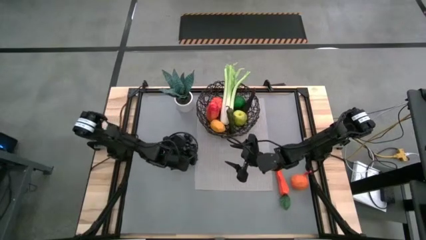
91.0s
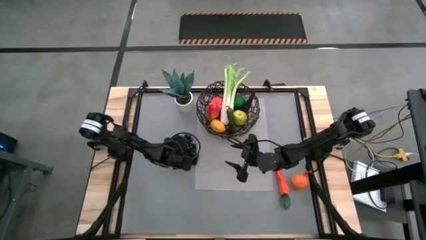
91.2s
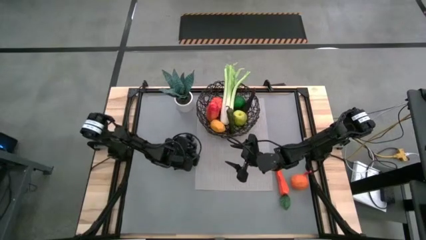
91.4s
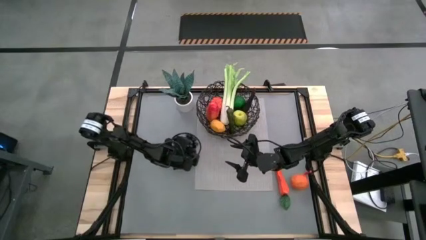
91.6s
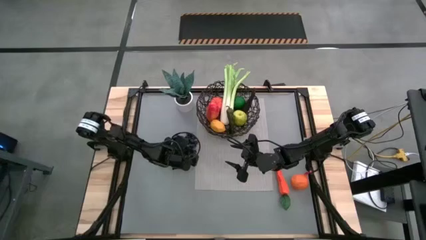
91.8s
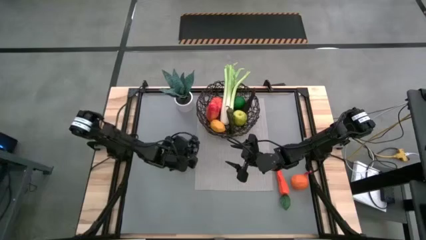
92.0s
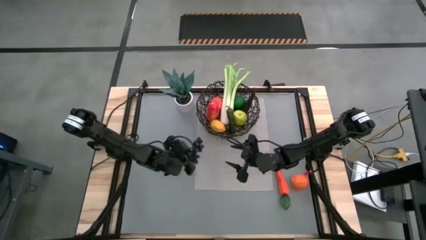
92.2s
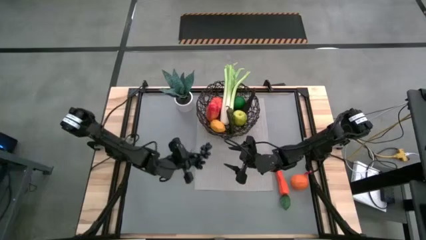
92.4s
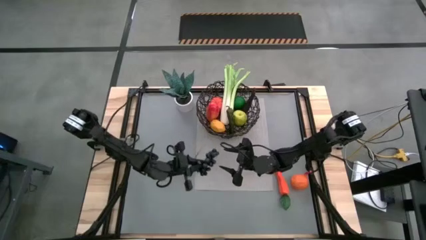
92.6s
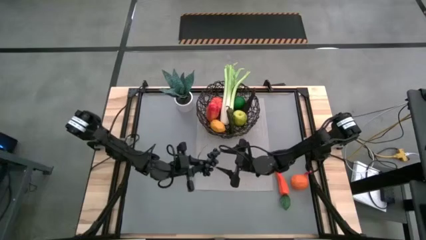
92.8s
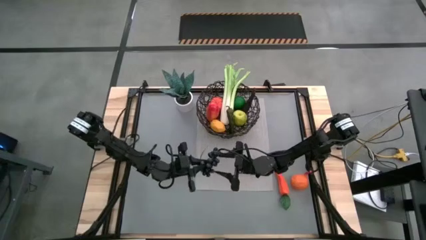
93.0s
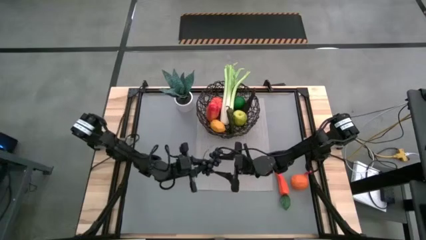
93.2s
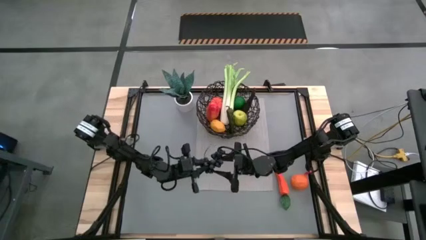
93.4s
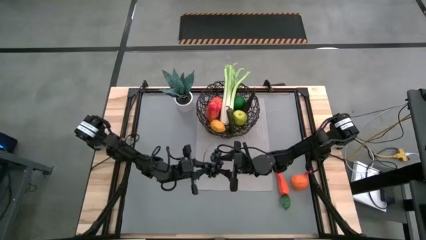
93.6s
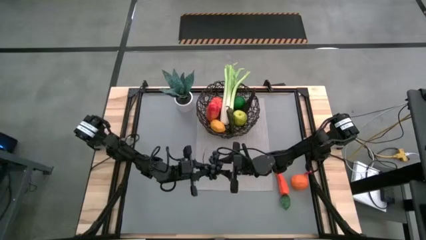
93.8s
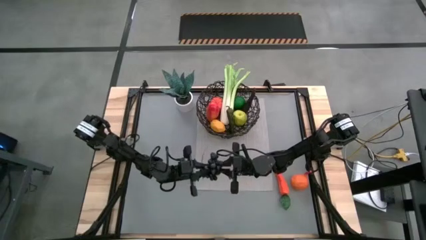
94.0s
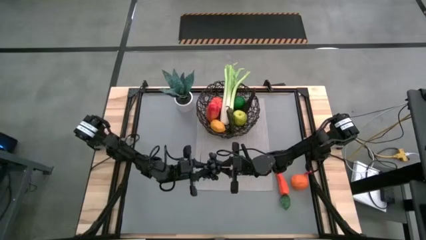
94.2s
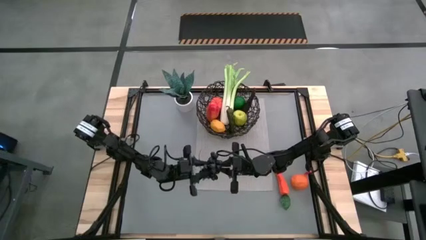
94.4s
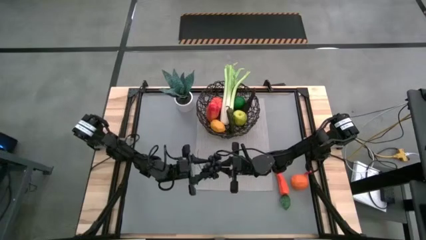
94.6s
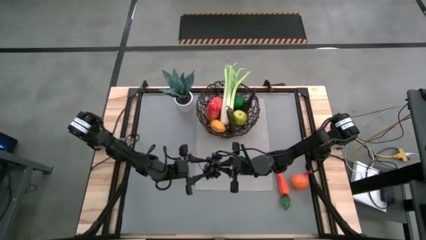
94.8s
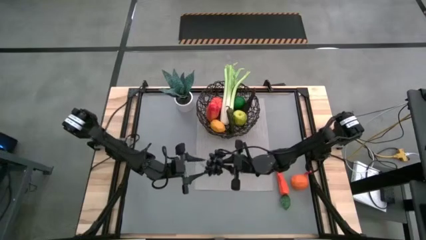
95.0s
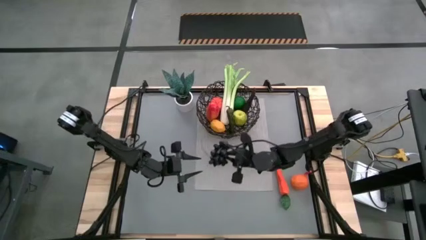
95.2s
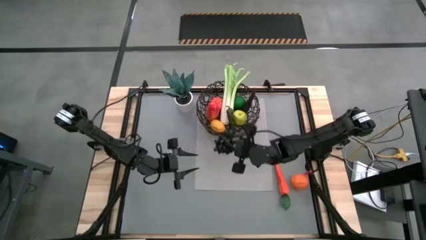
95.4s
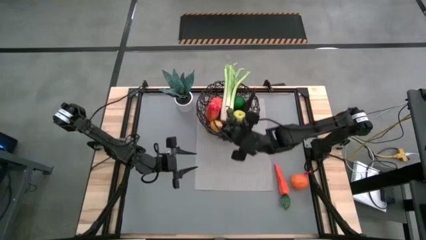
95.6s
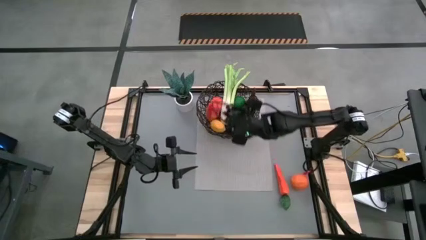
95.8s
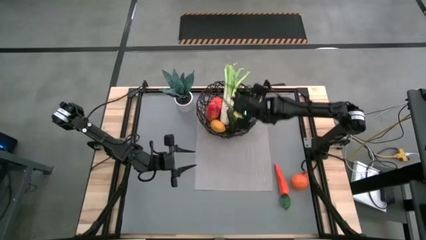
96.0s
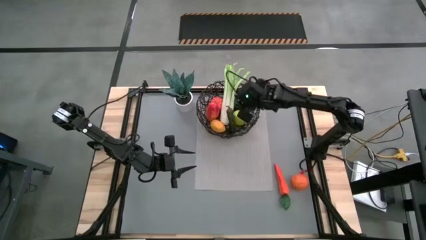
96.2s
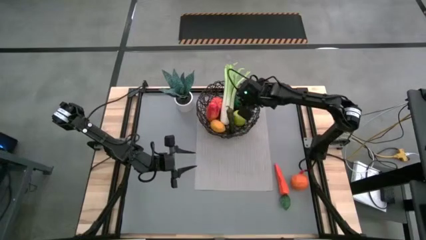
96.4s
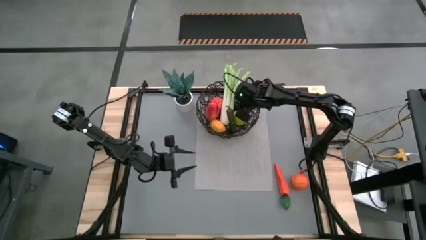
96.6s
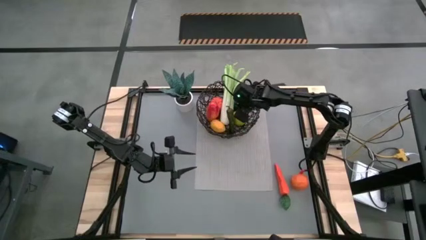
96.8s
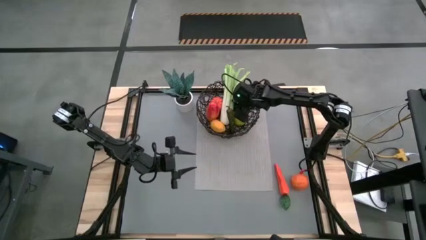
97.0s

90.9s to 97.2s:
Task: Build produce basket
Put the dark purple grapes into the black wire basket

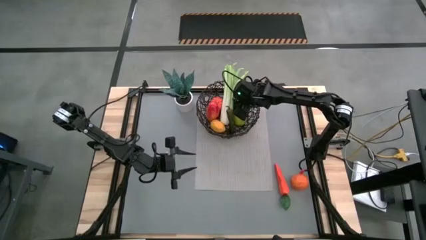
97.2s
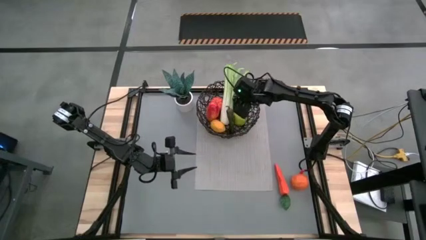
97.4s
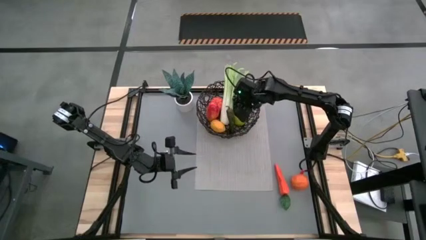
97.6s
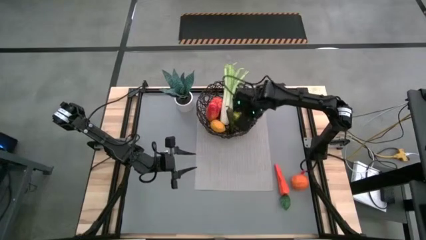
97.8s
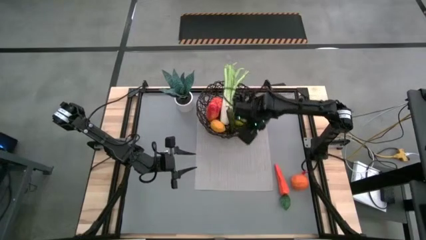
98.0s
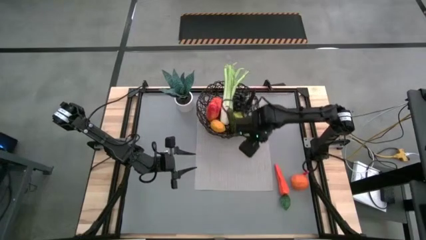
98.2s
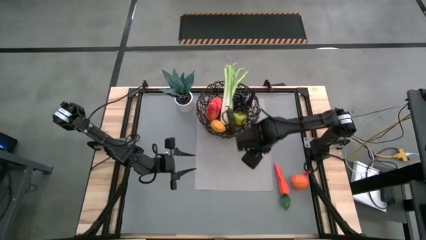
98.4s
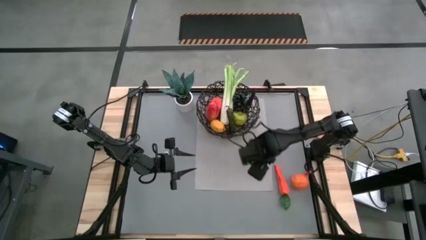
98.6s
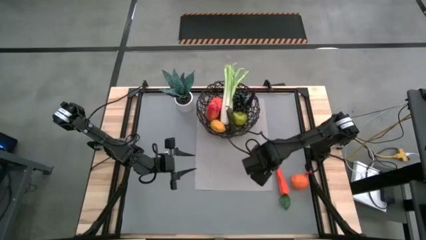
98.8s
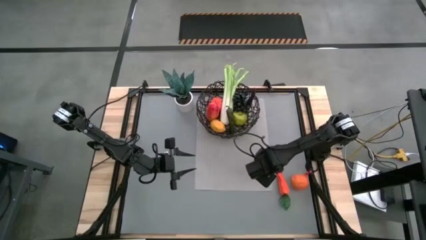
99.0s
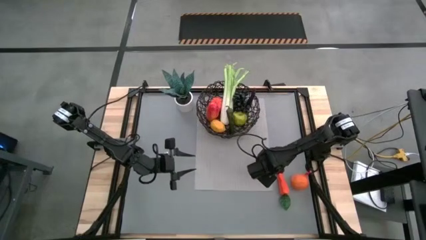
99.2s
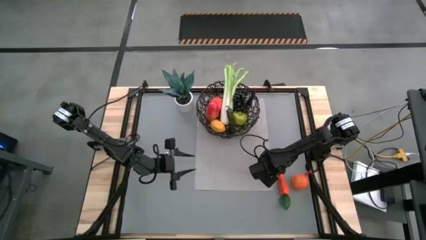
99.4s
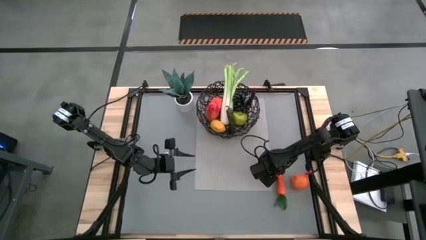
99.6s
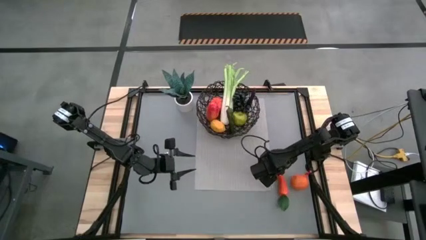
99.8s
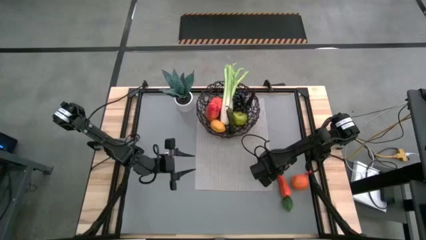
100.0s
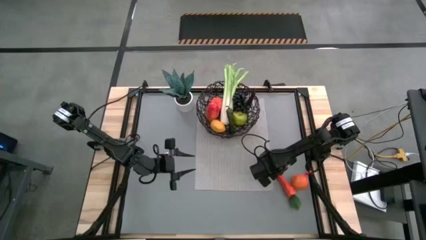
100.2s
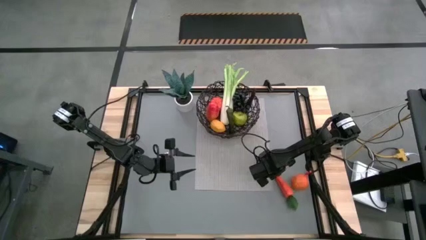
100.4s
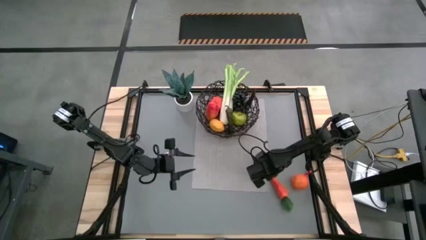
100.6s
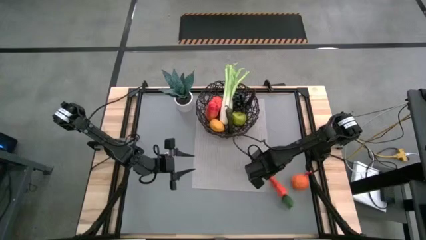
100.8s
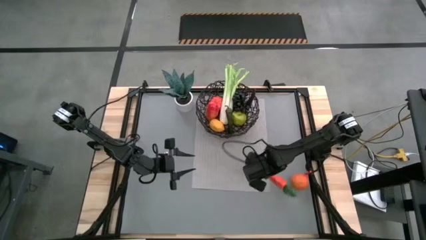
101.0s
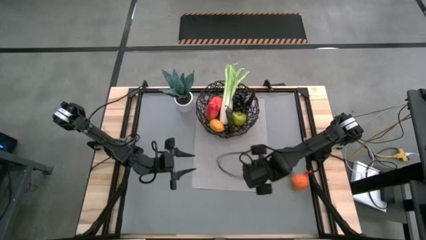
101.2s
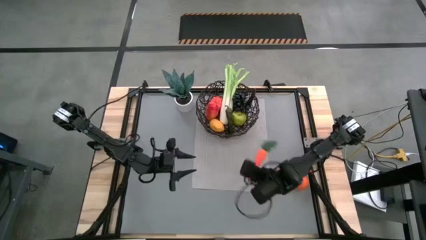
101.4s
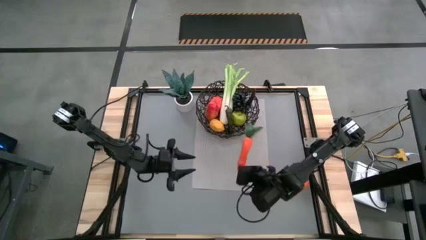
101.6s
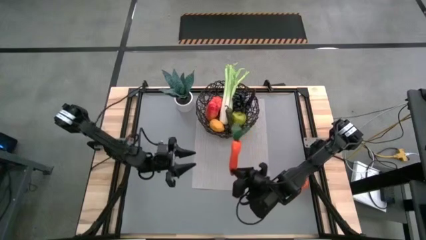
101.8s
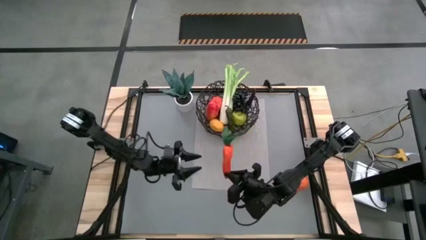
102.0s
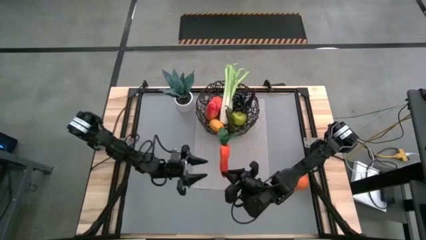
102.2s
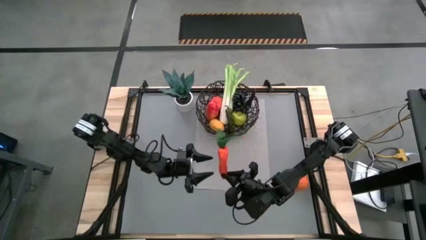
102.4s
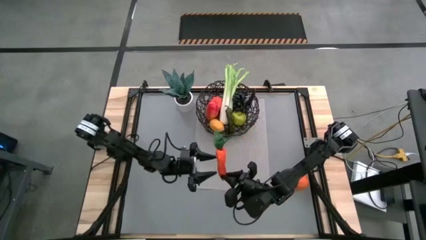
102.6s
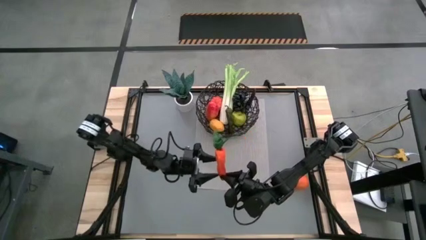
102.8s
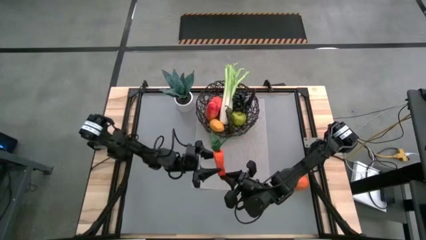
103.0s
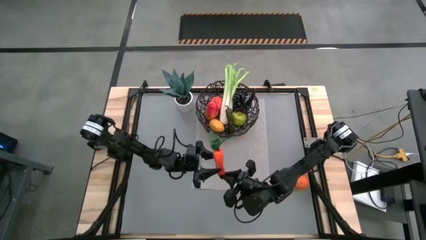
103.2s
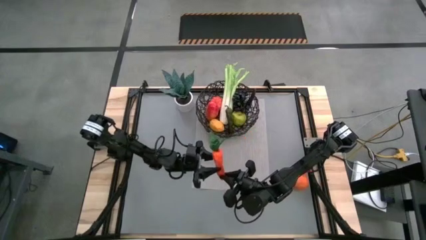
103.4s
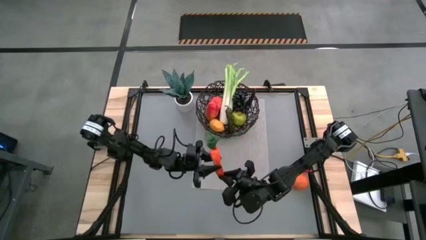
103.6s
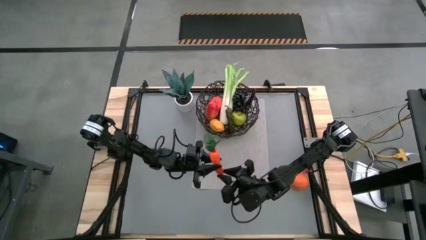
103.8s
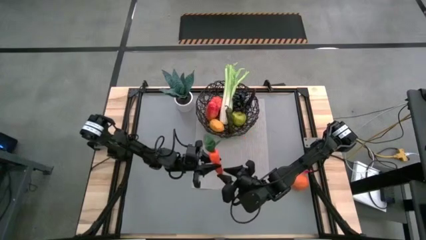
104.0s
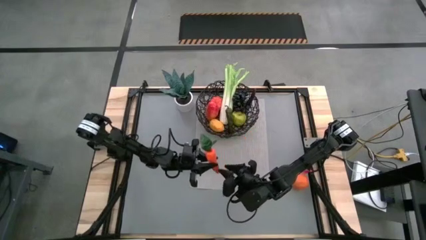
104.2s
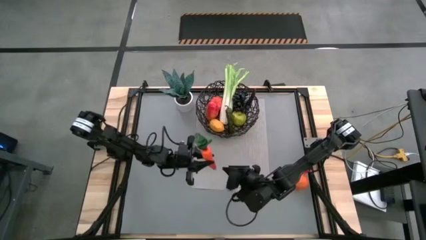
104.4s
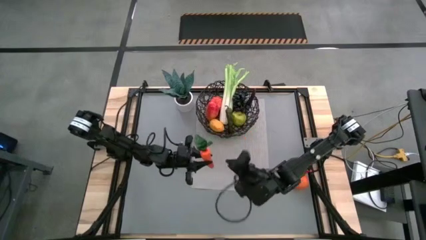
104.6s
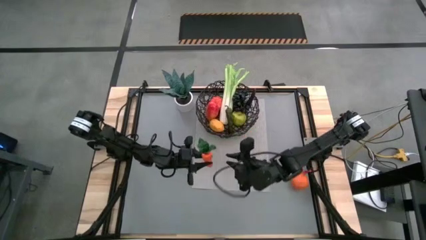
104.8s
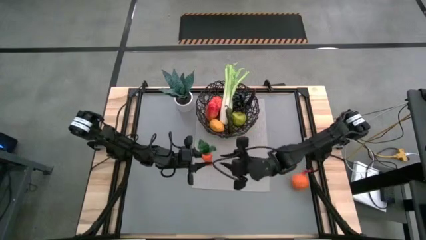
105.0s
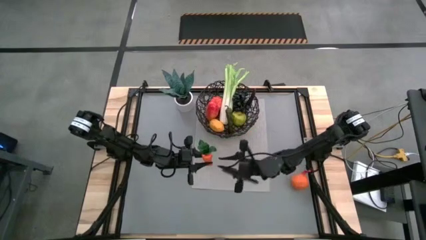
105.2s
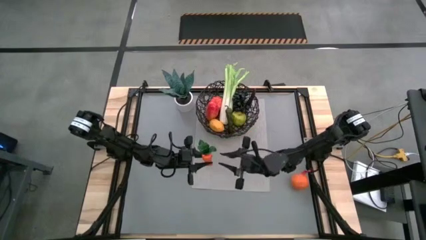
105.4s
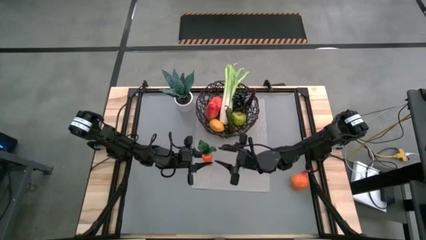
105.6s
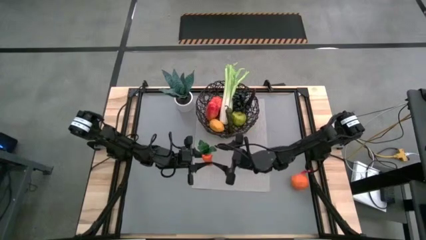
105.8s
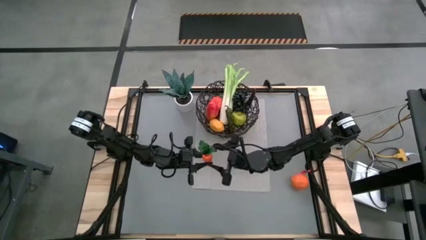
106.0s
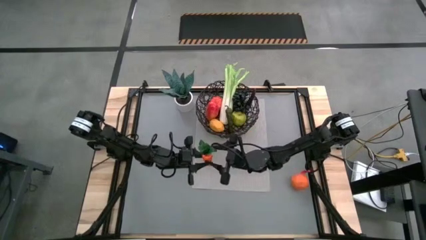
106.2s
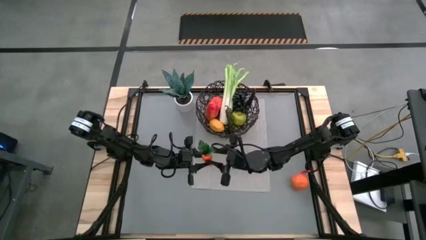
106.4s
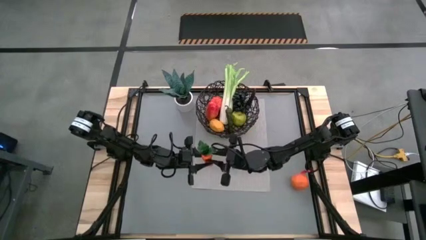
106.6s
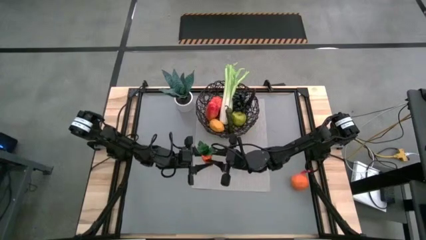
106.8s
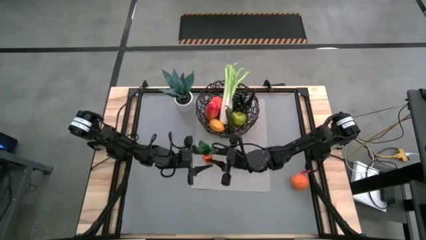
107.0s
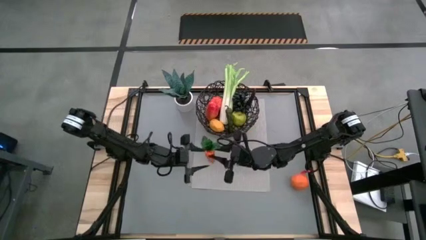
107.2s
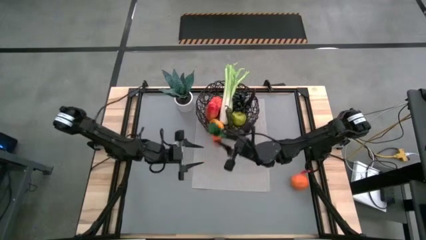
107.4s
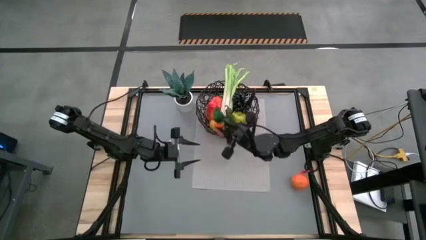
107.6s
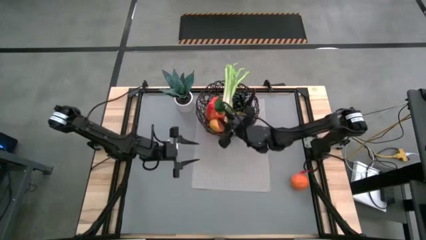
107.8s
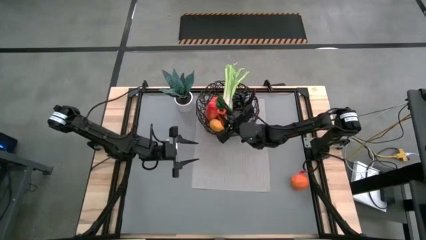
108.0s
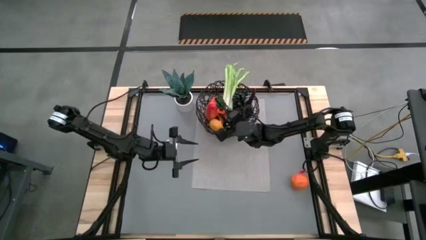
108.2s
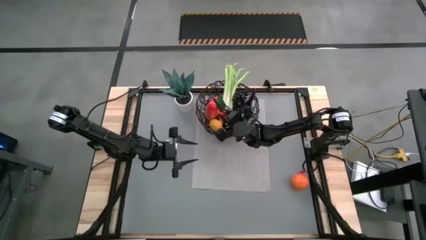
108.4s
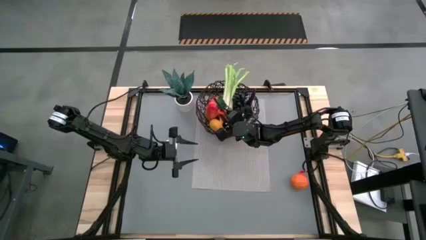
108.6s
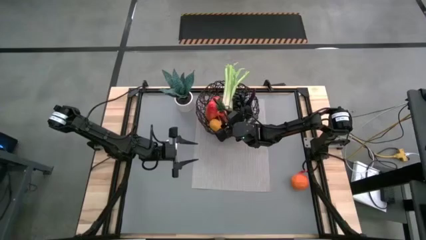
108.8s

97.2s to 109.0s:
Put the orange carrot into the black wire basket
